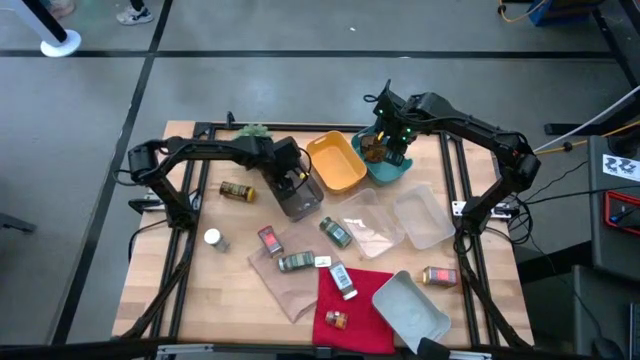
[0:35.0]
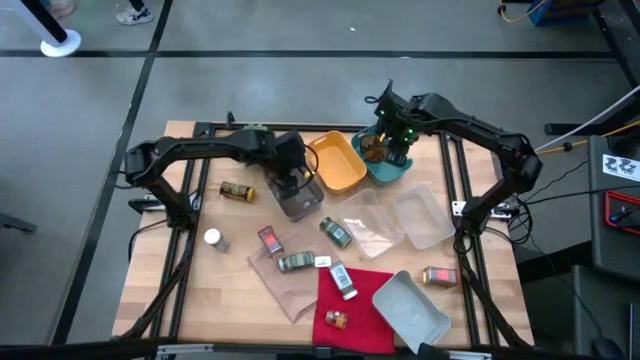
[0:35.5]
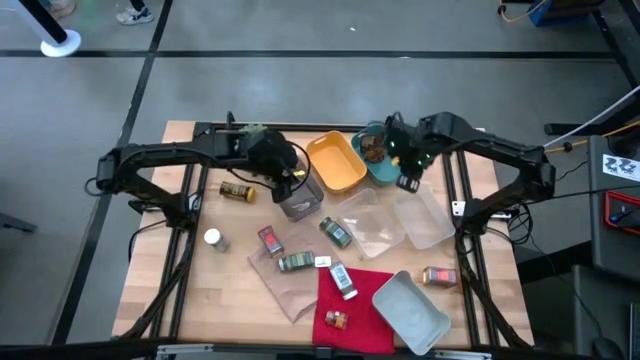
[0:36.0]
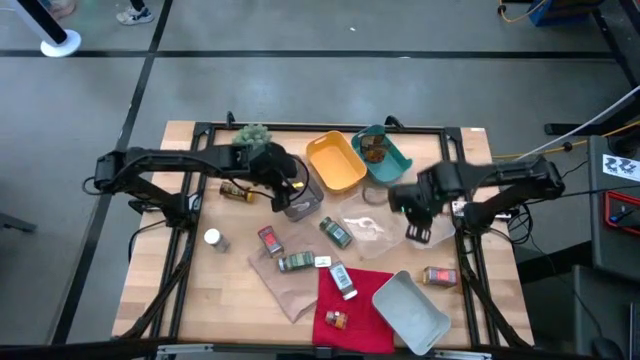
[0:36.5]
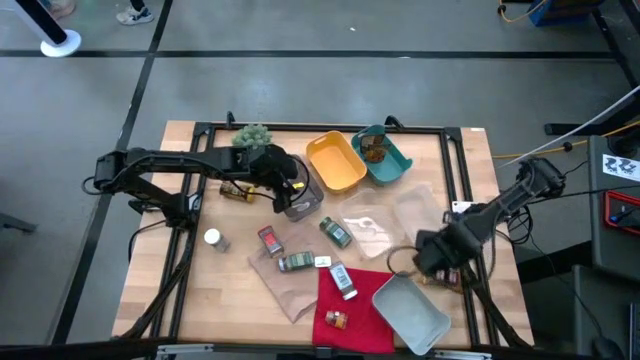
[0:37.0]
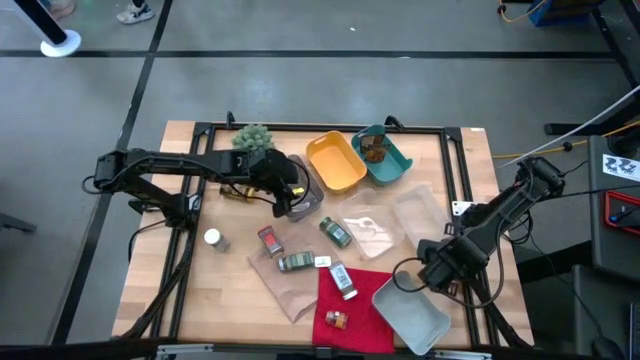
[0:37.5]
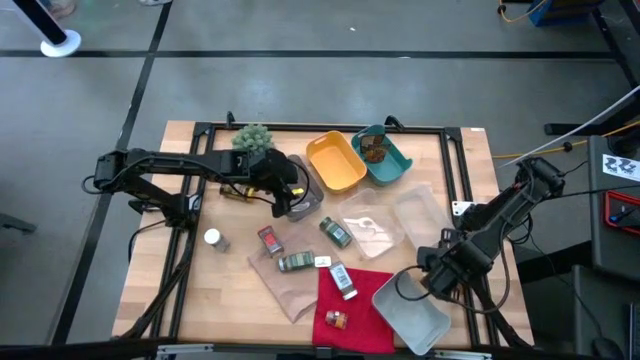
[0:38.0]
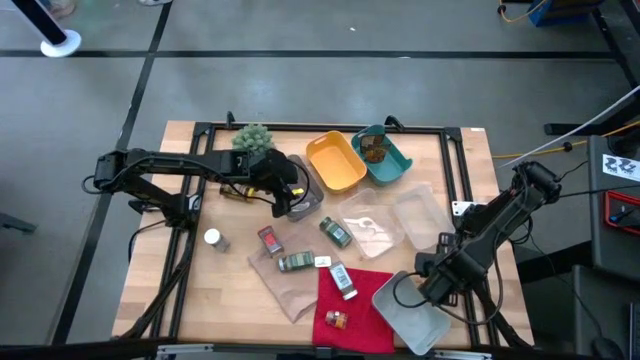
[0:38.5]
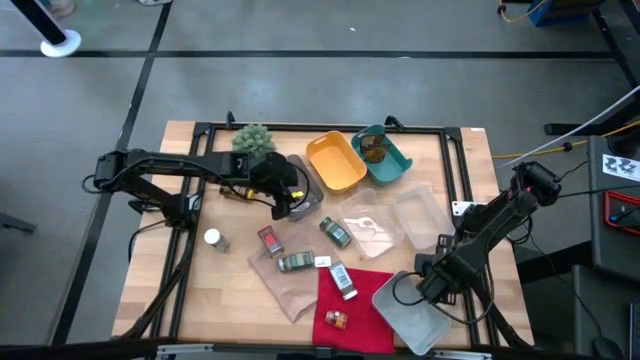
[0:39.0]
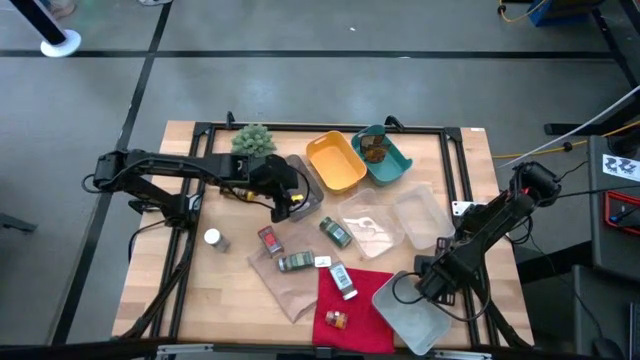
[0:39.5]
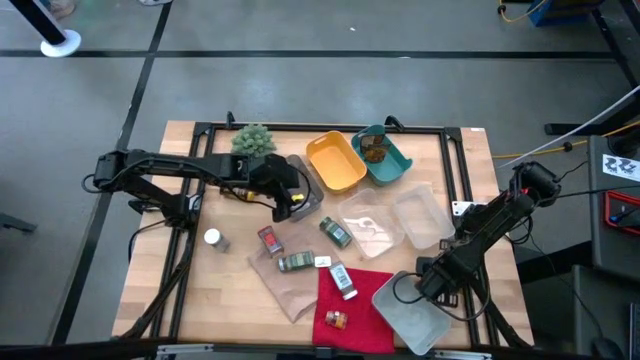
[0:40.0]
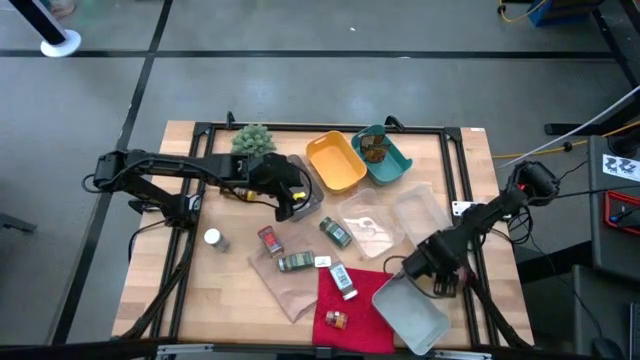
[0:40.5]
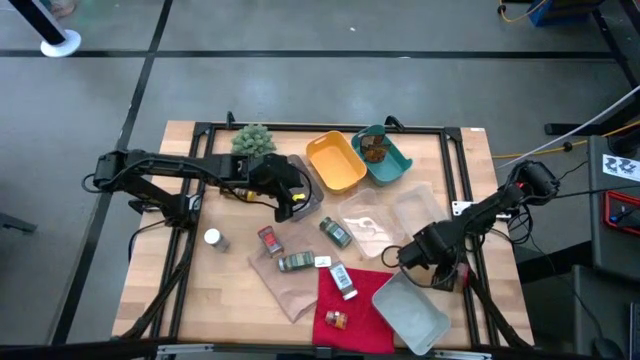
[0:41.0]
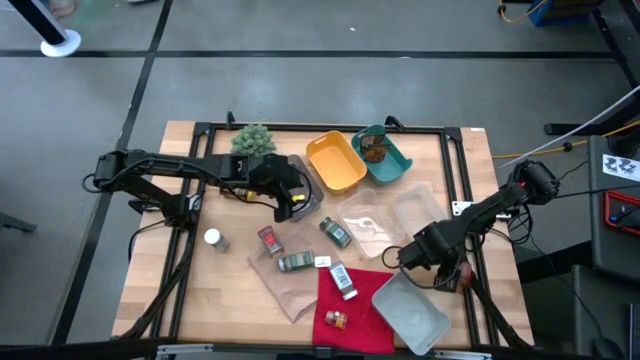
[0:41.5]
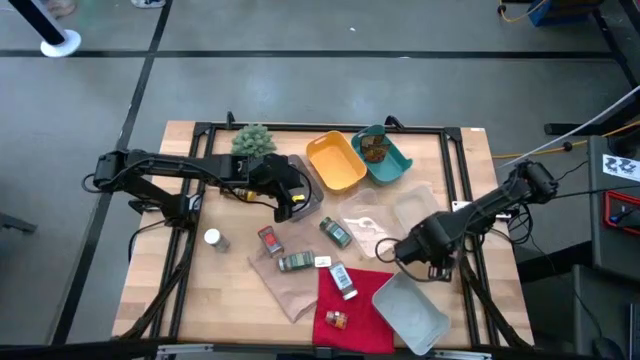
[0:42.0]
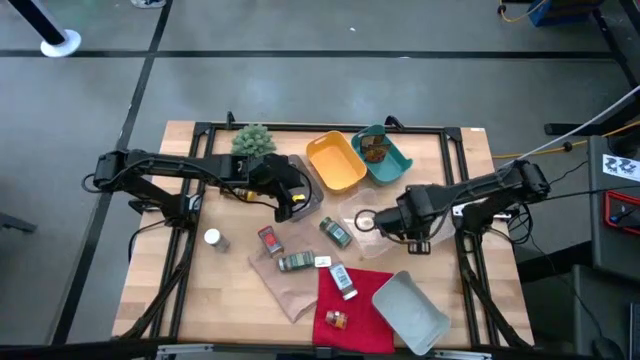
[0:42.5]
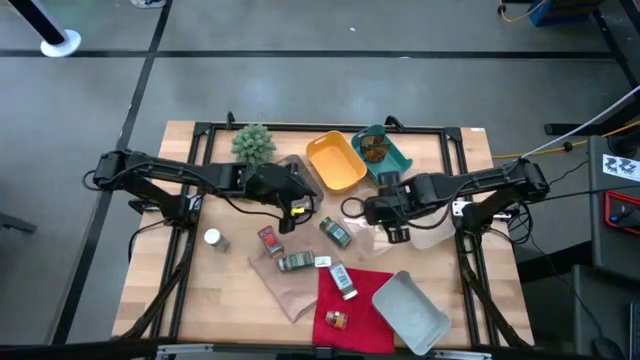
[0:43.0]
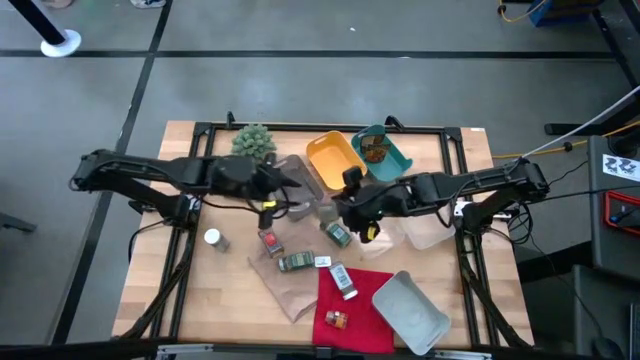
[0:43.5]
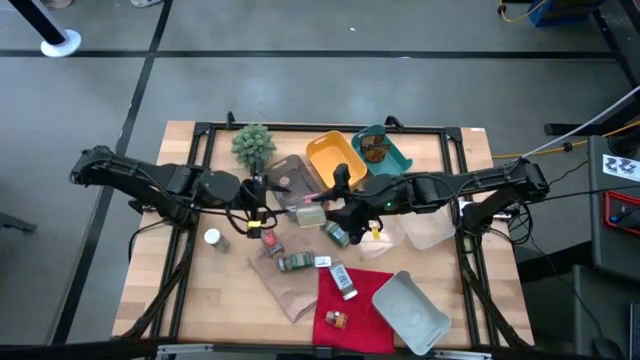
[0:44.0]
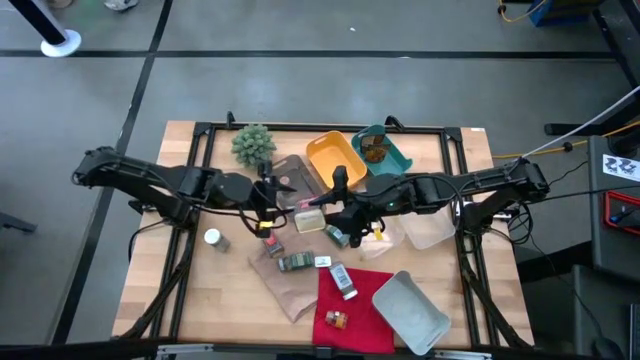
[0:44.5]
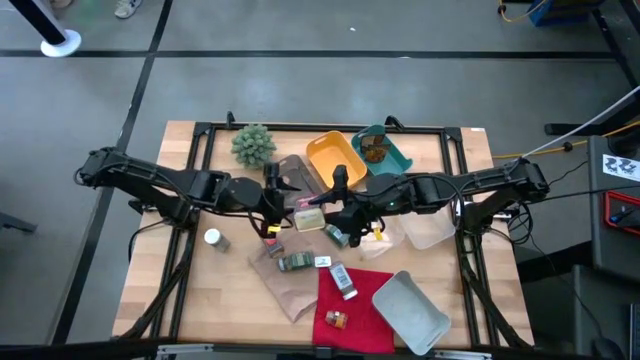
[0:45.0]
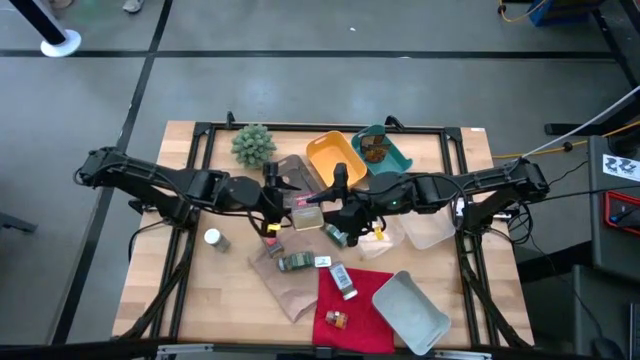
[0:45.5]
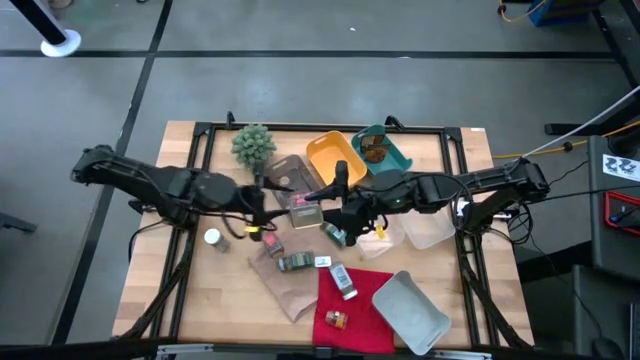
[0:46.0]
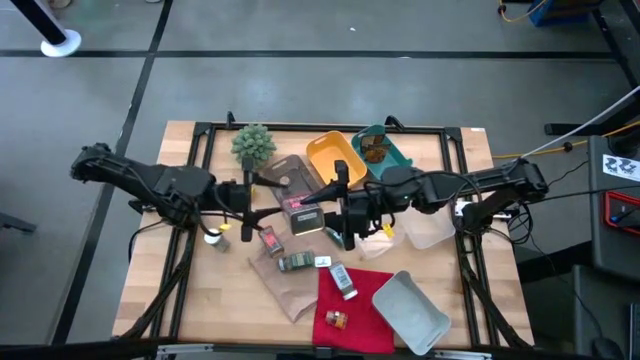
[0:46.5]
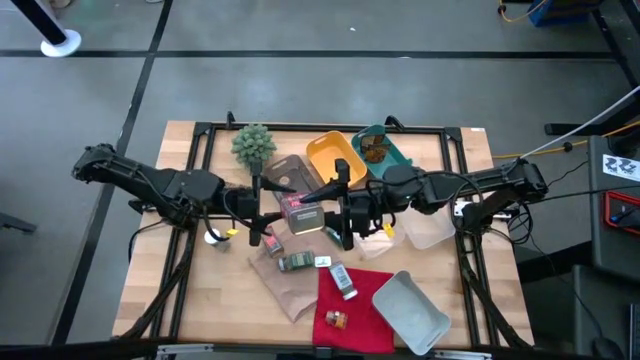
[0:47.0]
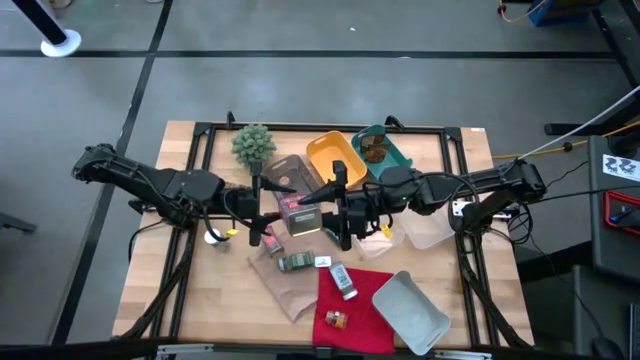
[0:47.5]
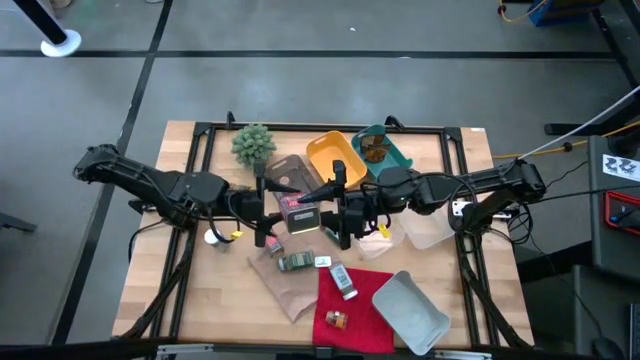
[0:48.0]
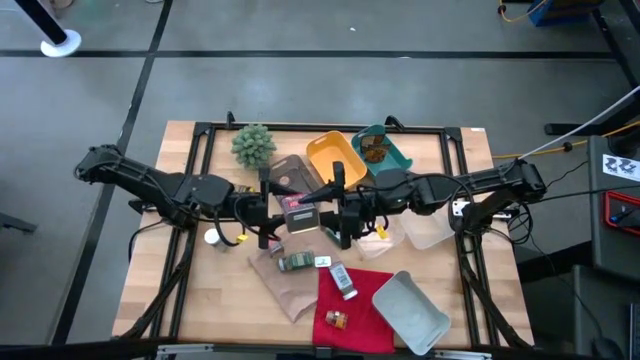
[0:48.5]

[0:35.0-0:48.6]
Task: Sort spices by type
Put the right red seasoning can into the yellow bin

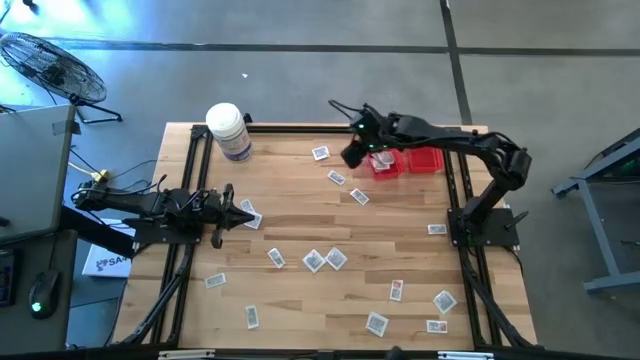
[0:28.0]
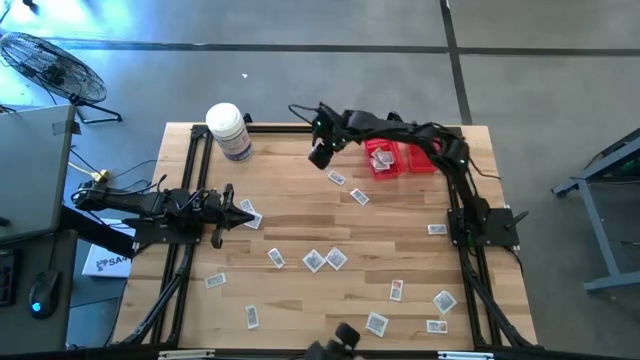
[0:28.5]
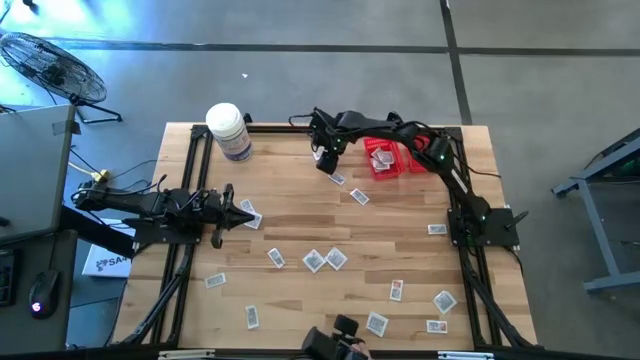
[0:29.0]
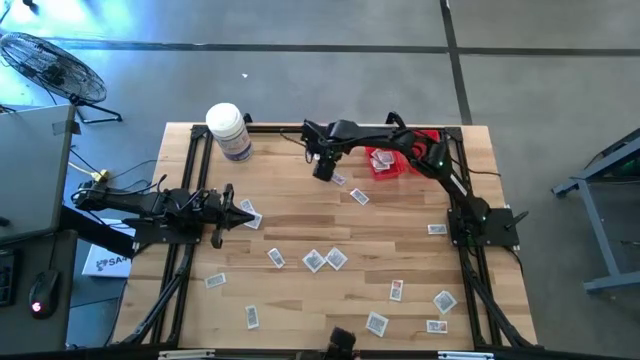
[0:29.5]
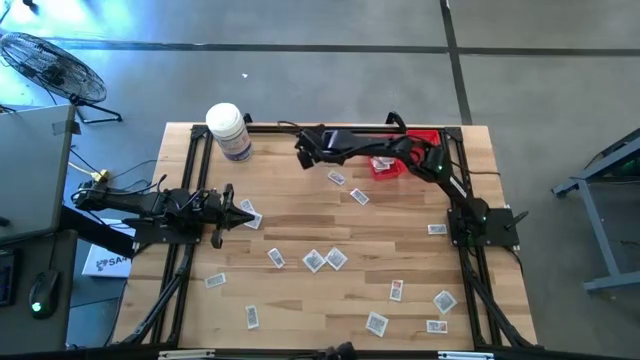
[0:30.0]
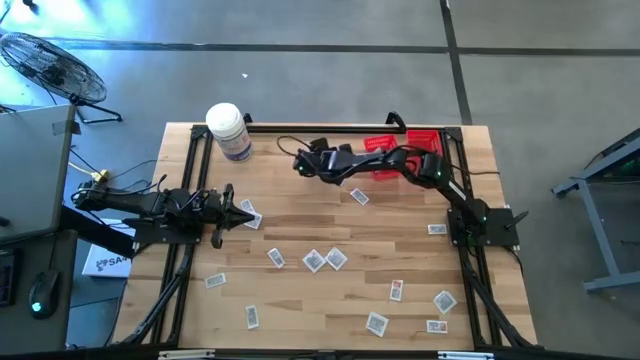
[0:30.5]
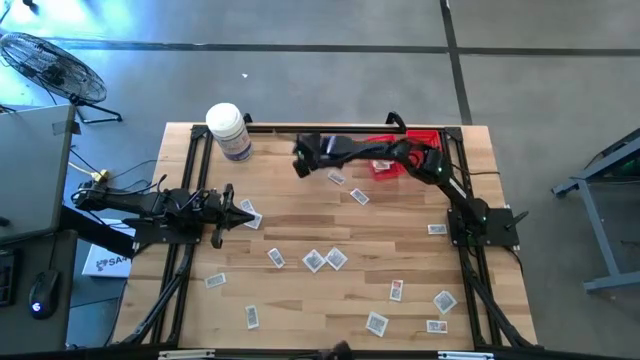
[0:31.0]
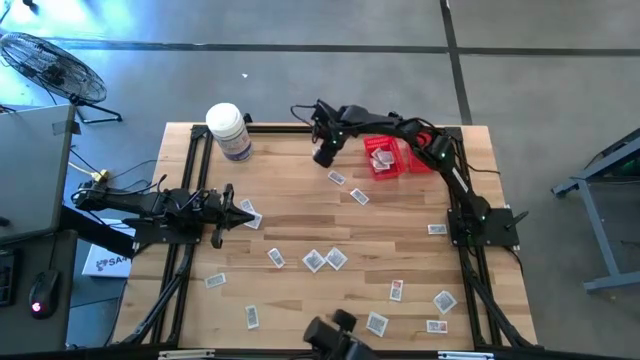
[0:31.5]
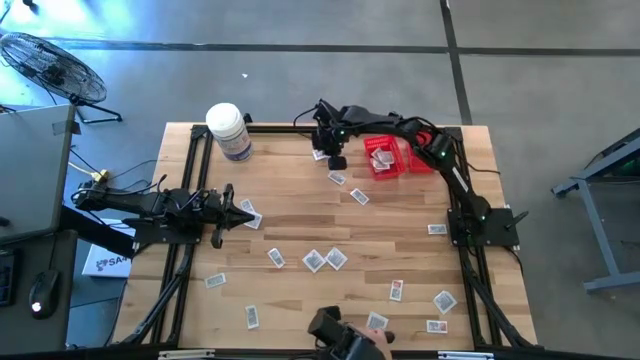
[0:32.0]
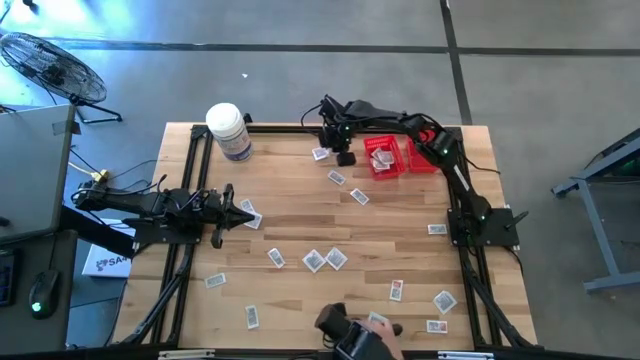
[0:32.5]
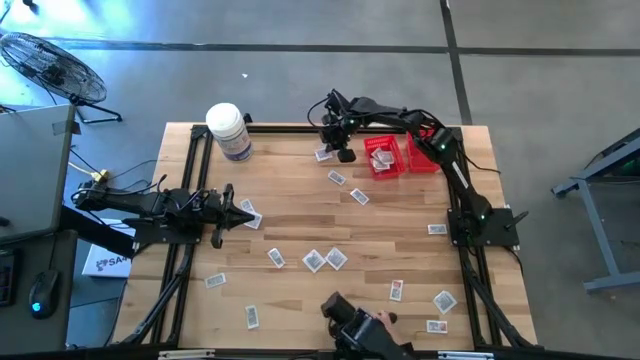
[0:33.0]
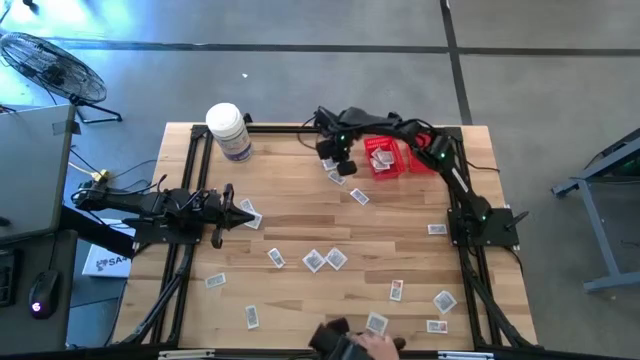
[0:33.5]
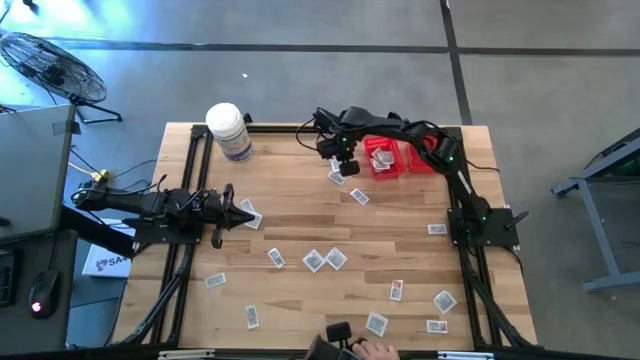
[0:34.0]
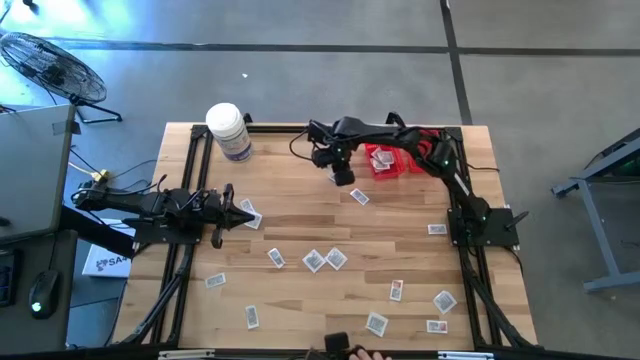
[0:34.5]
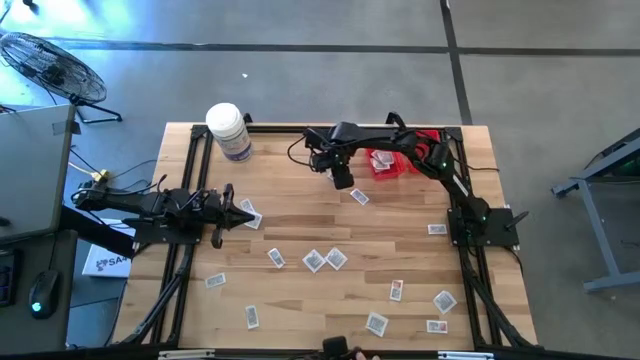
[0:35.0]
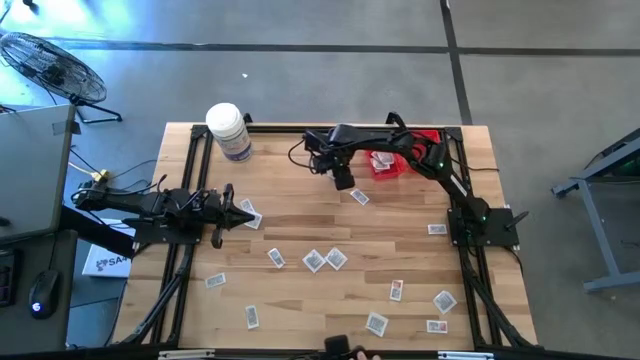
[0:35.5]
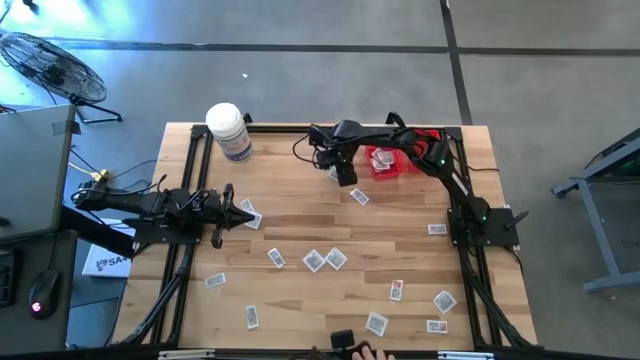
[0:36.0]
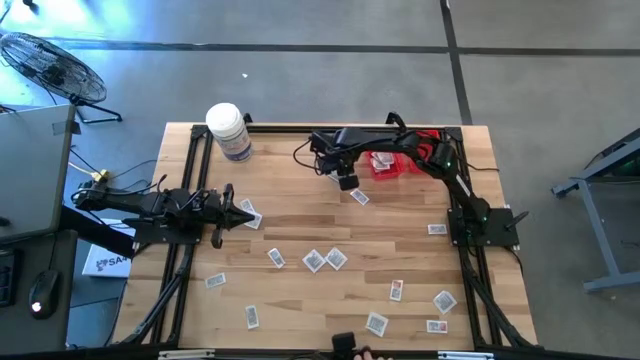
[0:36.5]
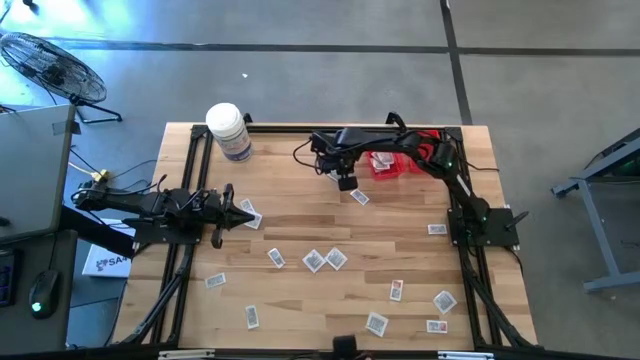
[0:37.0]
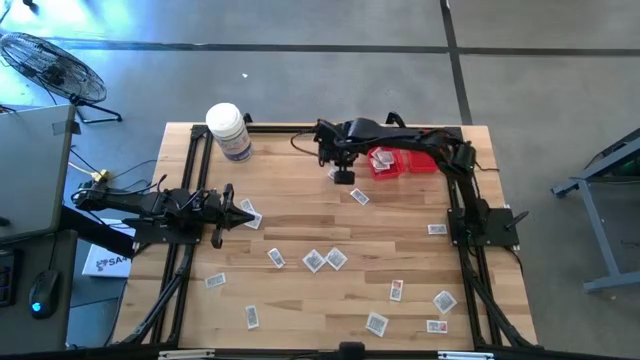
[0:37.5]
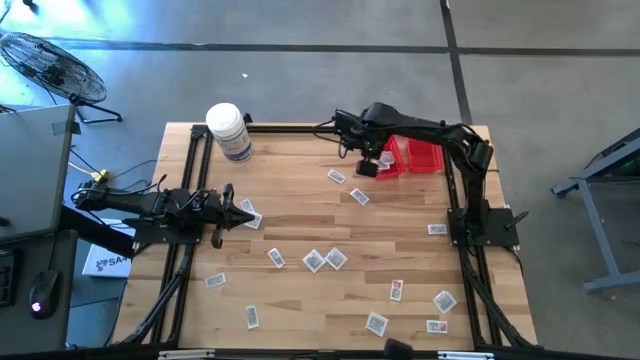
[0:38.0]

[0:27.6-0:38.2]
Task: Pick & Place First Aid Supplies
Put the towelette pack into the left red bin
